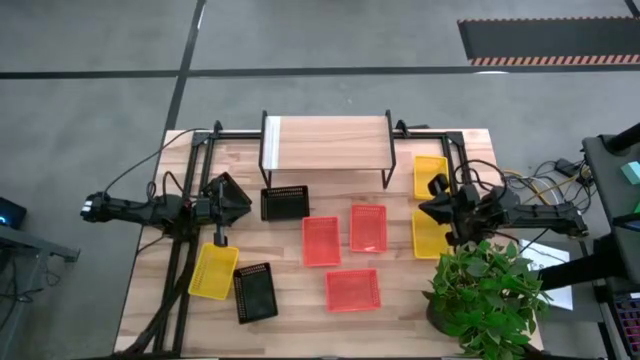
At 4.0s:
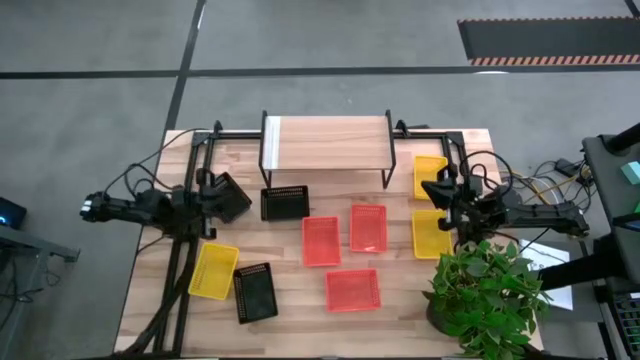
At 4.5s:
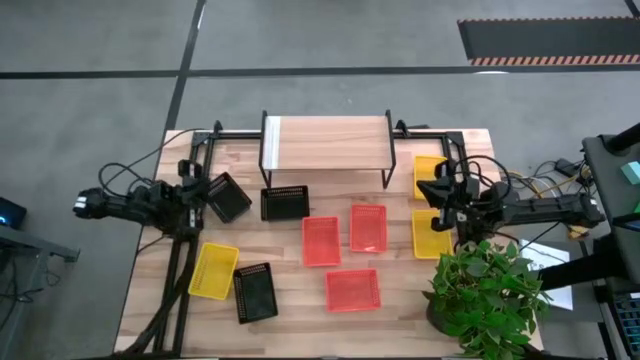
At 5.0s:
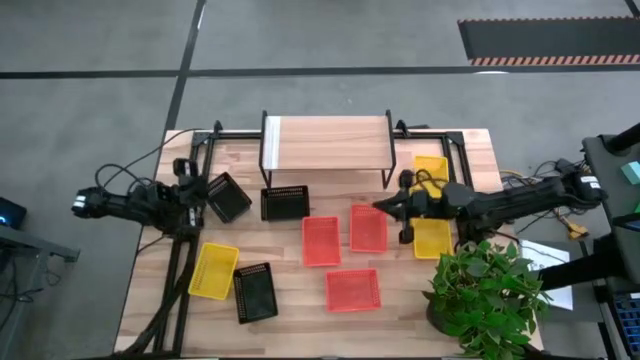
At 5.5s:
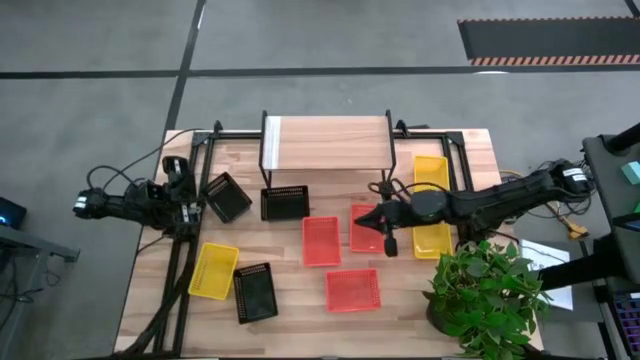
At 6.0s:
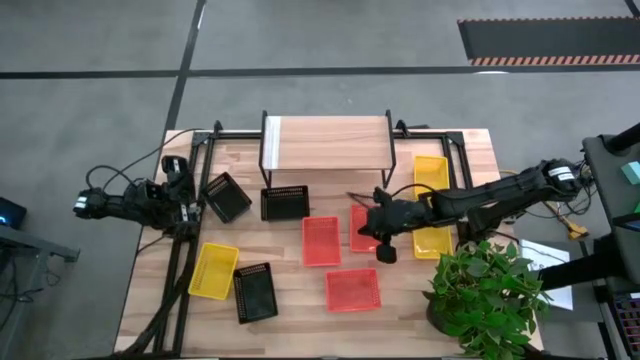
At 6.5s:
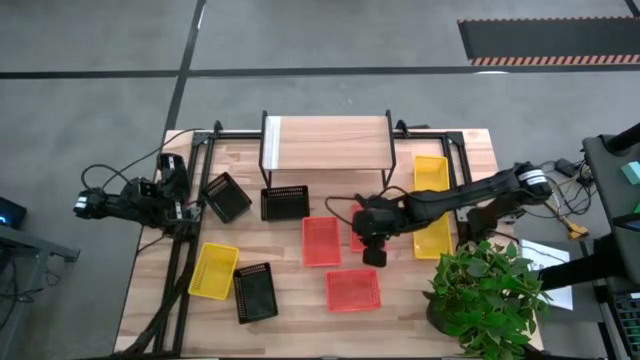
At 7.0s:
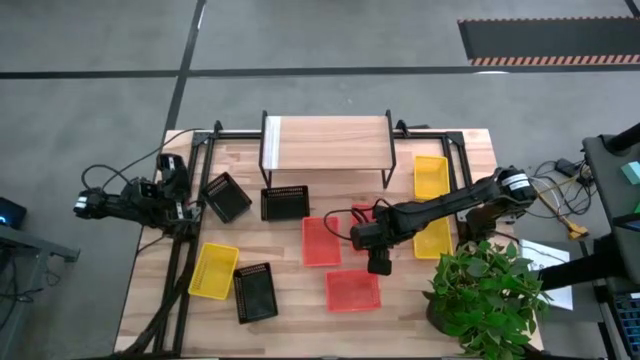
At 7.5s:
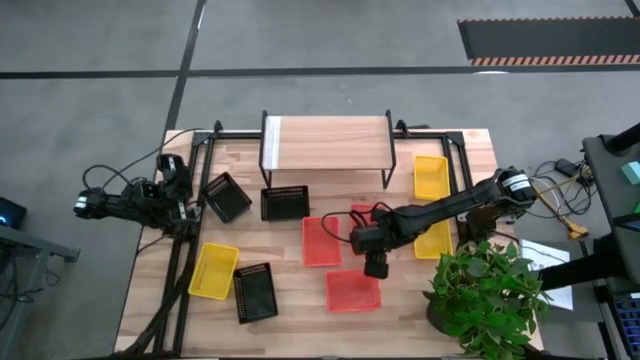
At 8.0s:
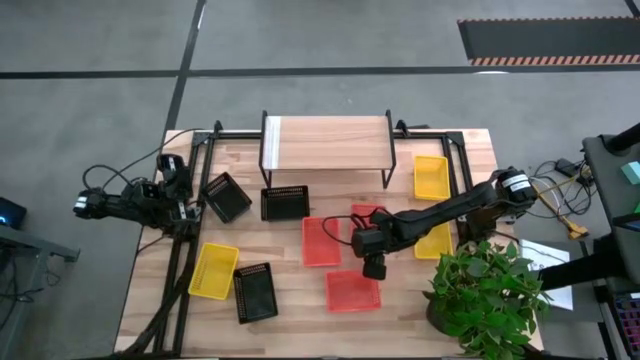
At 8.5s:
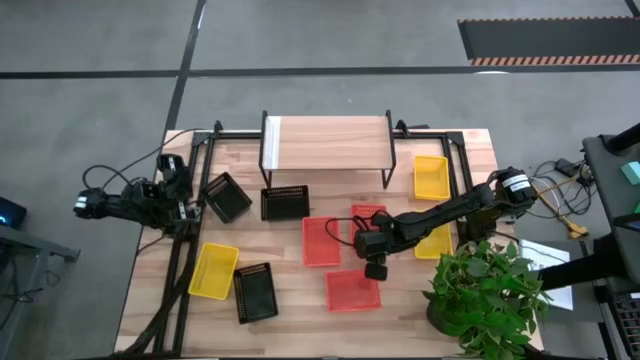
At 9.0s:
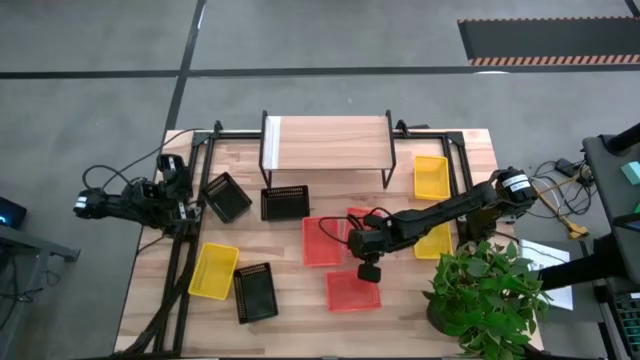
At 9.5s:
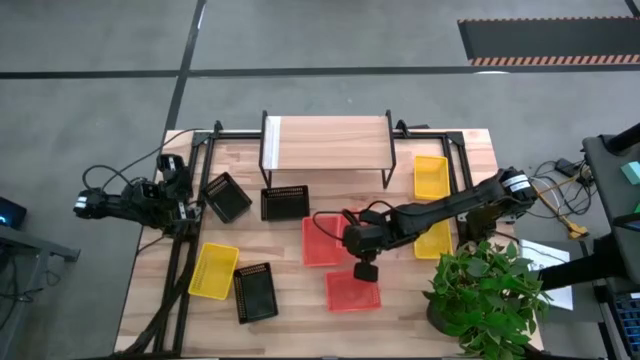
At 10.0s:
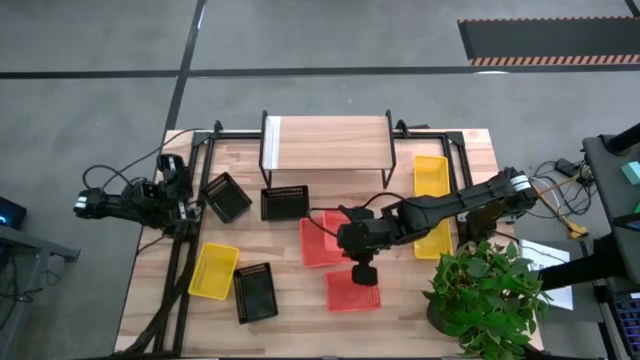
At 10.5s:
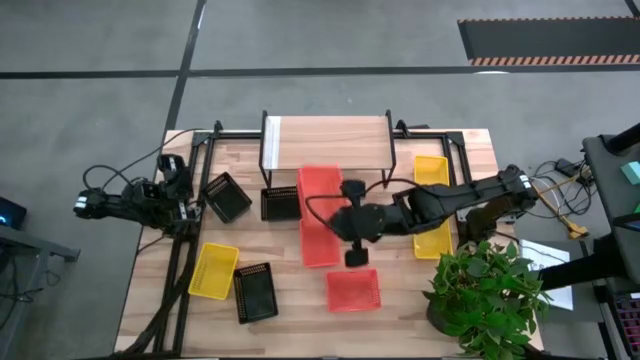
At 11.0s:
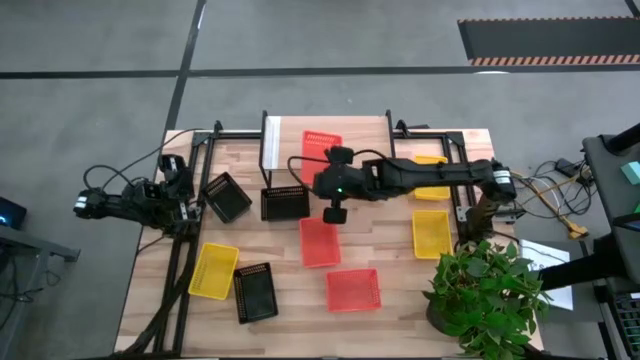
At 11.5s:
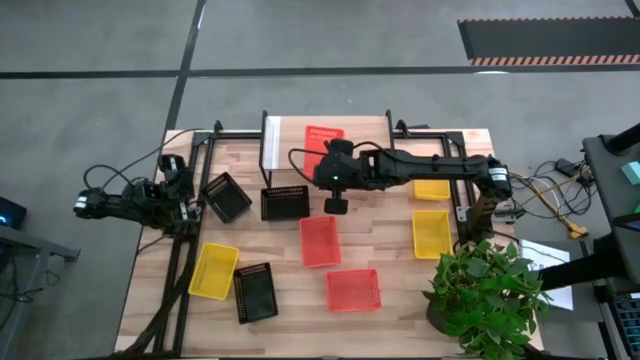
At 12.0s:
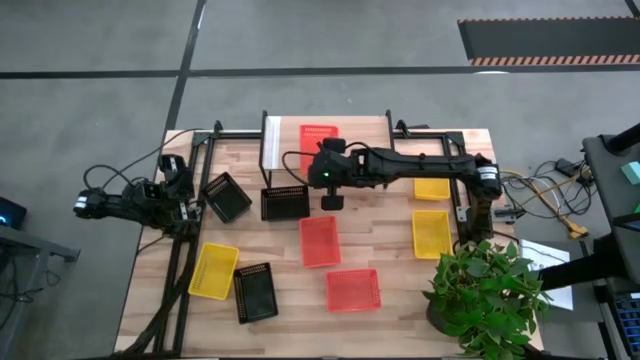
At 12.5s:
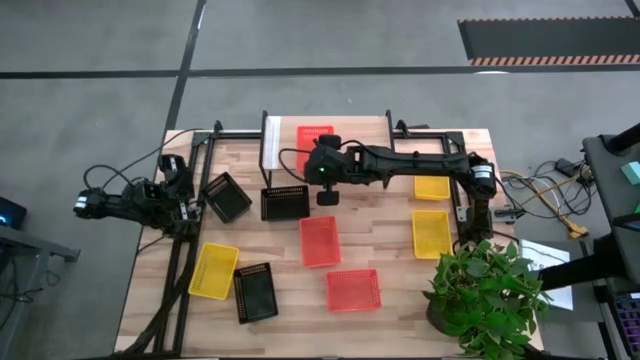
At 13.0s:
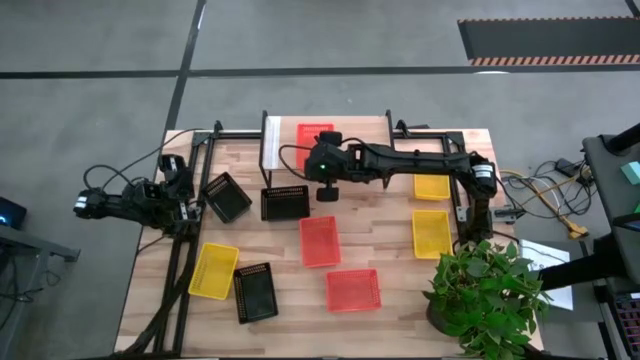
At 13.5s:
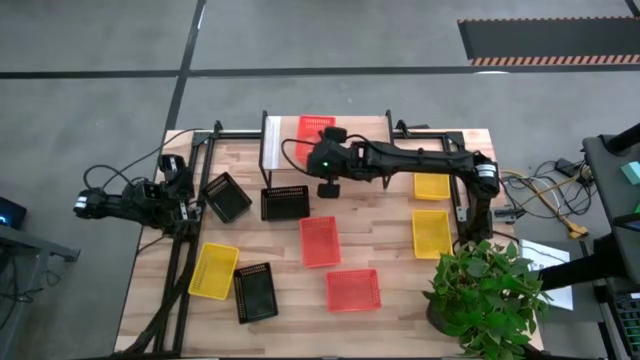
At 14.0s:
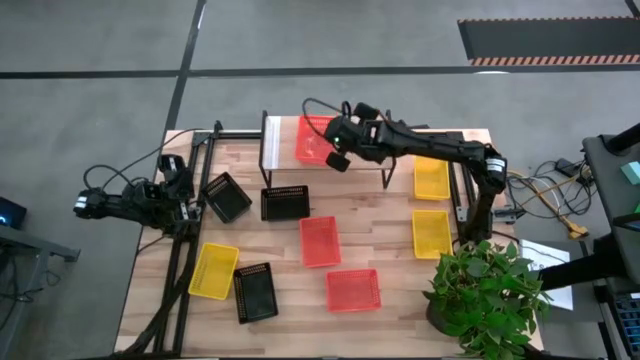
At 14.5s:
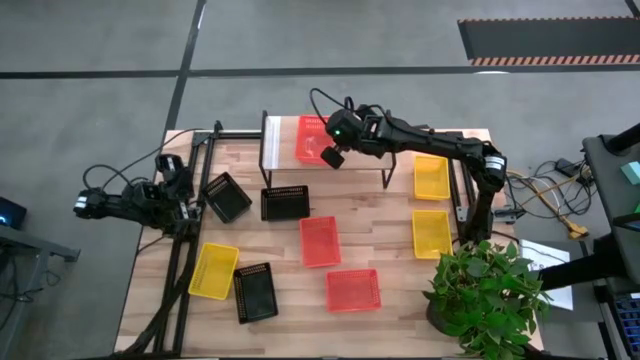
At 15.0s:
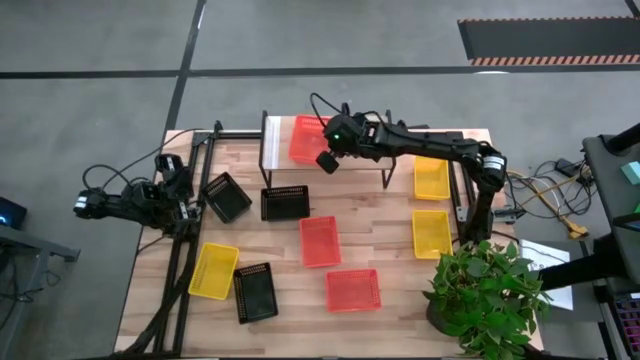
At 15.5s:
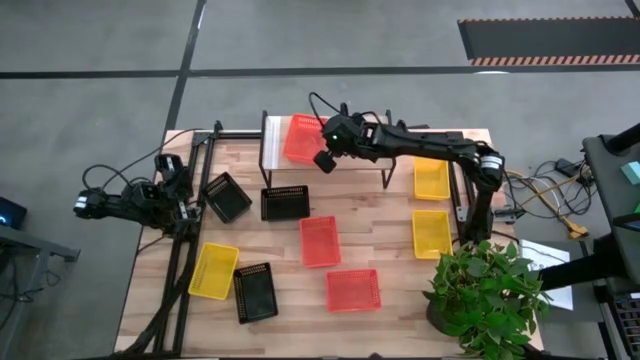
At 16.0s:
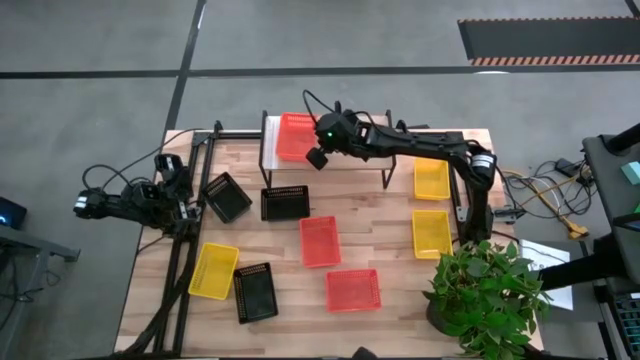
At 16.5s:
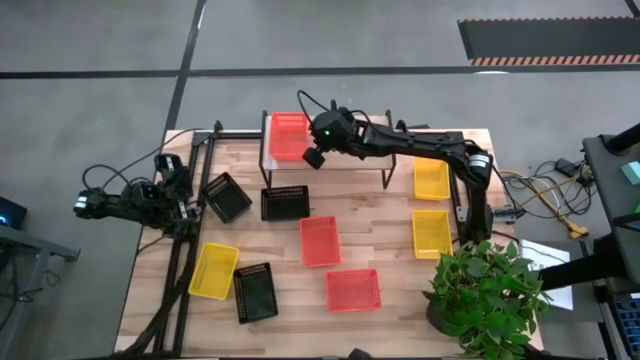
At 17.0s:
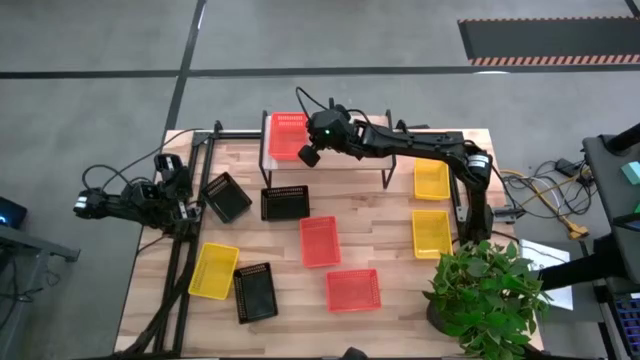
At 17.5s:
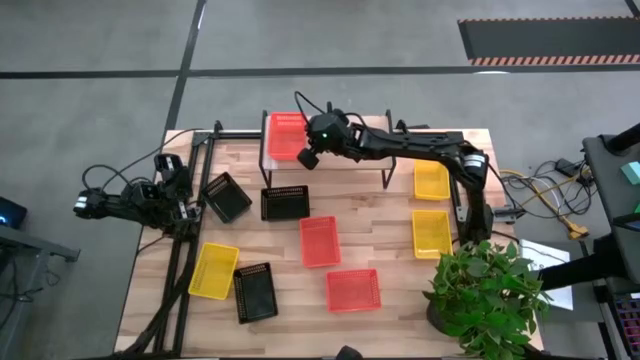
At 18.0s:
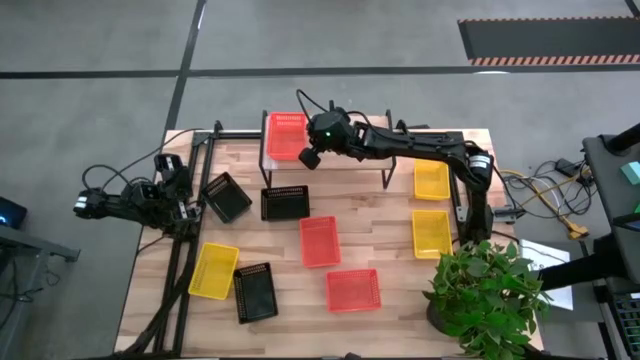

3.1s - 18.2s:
Put the top right orange basket on the shelf

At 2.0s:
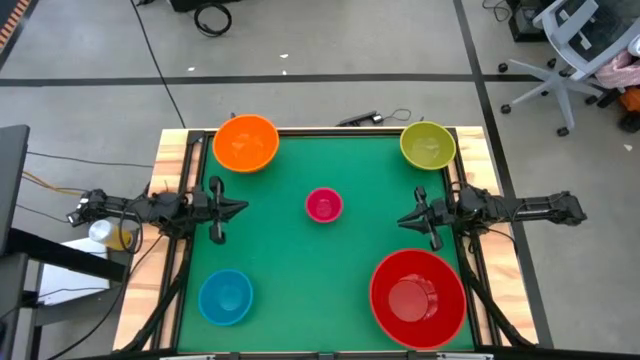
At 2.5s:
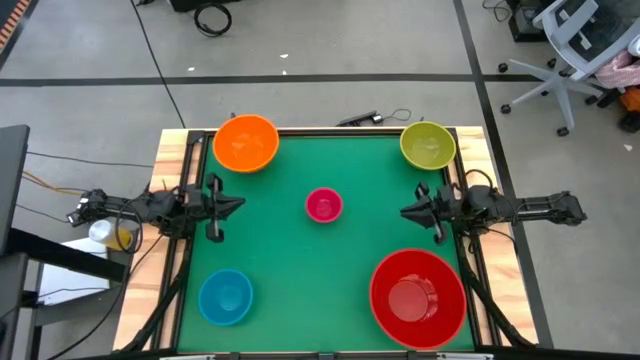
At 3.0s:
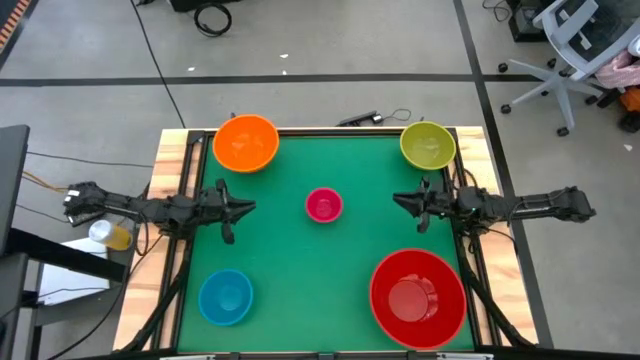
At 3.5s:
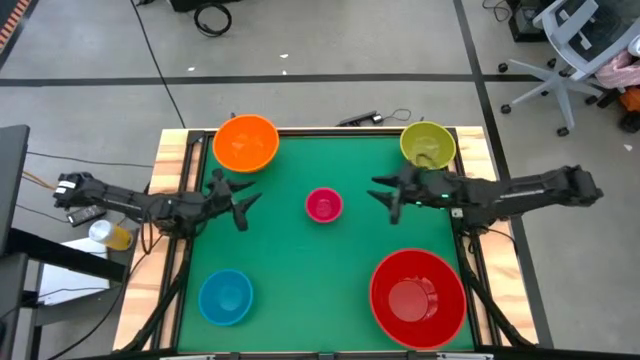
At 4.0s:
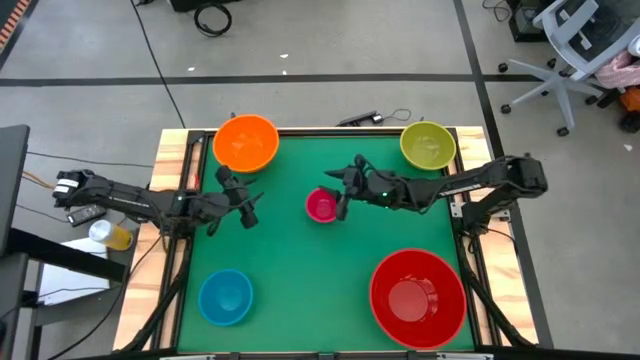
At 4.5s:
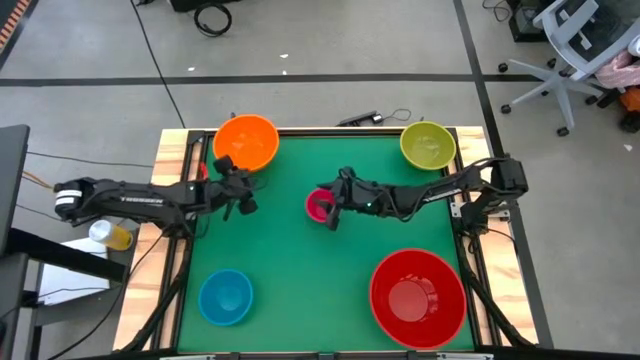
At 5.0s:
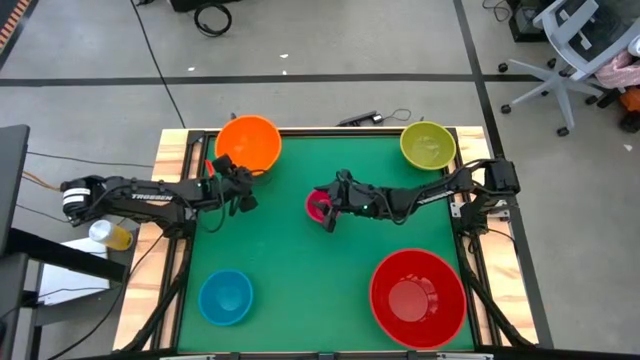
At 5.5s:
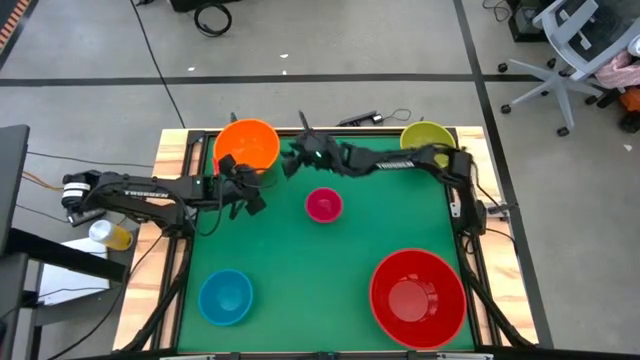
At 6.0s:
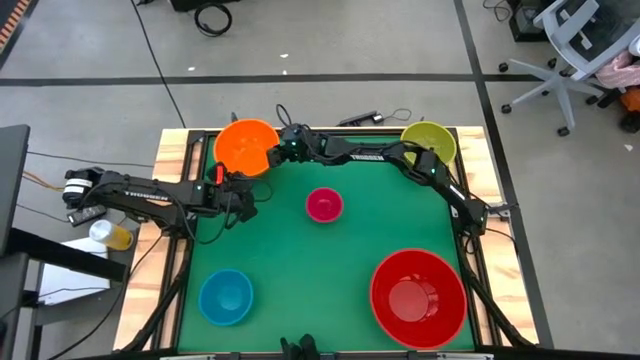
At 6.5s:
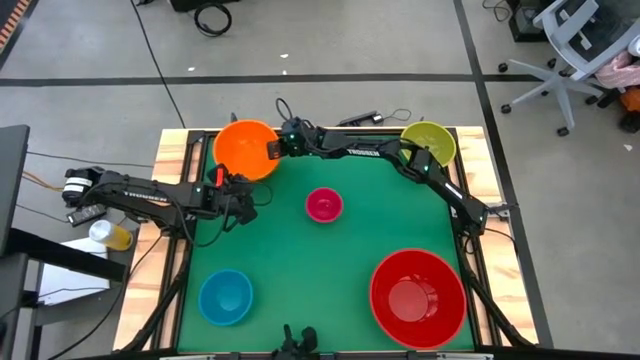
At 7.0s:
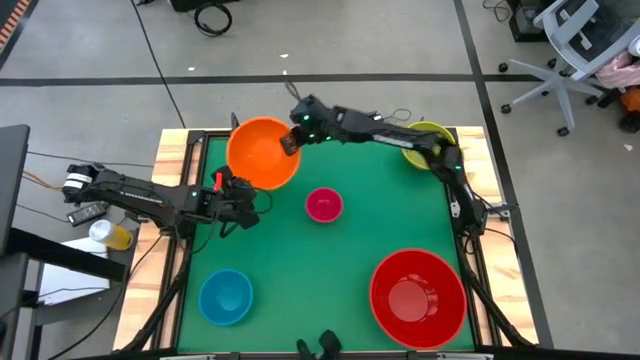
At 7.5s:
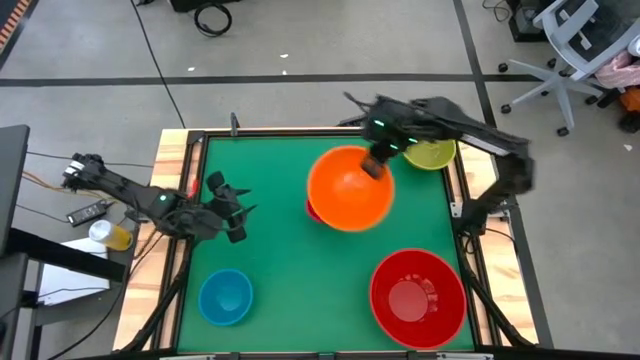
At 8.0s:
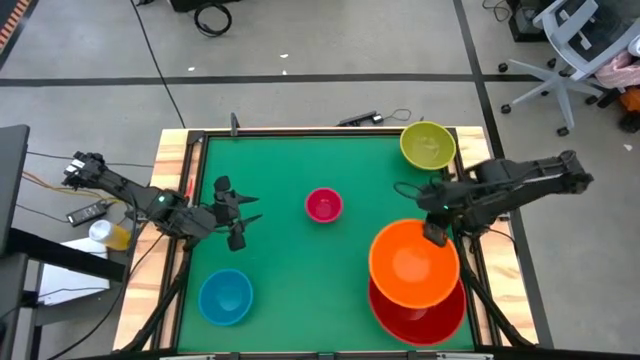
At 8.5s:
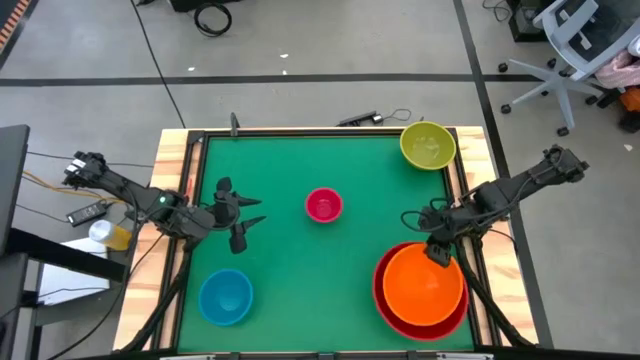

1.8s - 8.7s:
Stack the orange bowl on top of the red bowl
